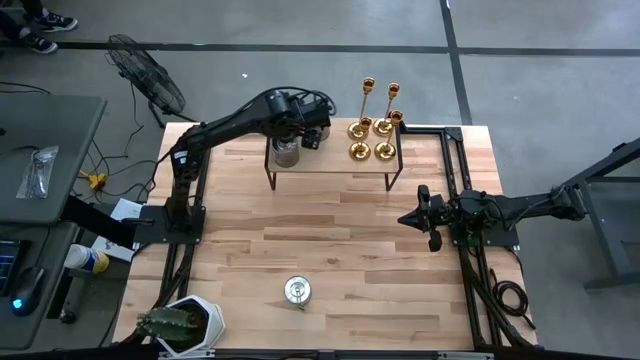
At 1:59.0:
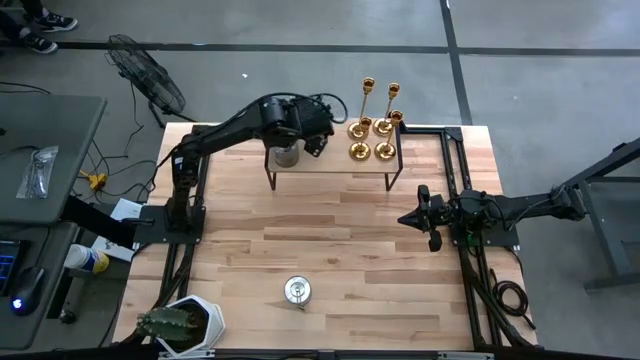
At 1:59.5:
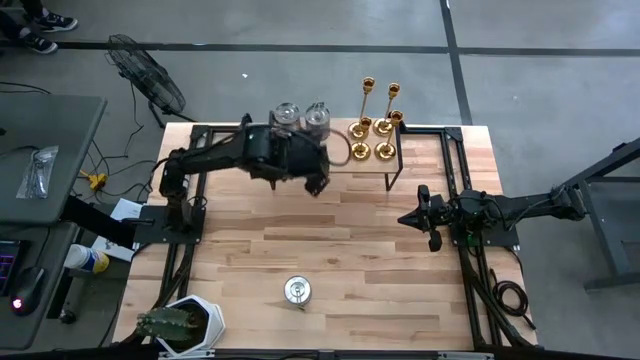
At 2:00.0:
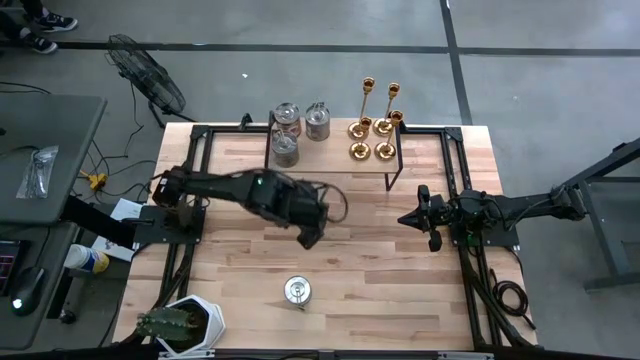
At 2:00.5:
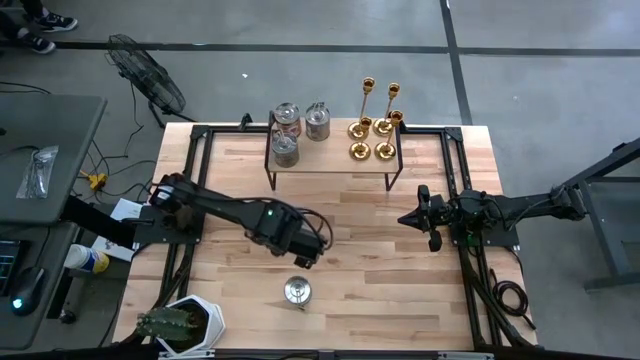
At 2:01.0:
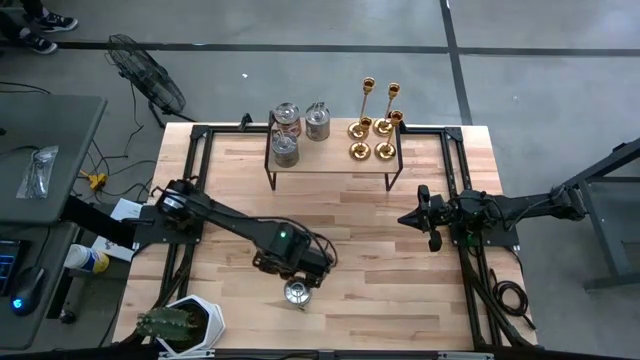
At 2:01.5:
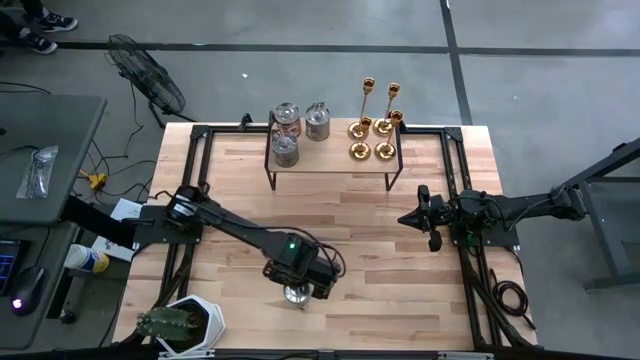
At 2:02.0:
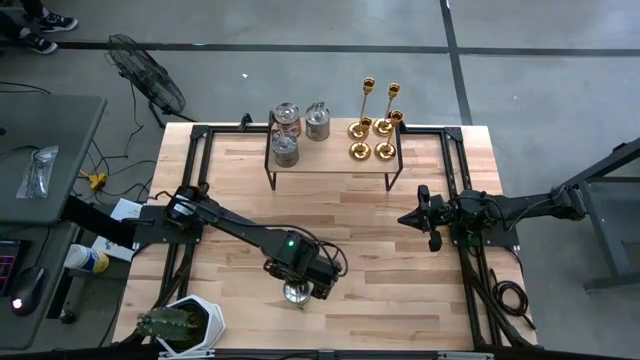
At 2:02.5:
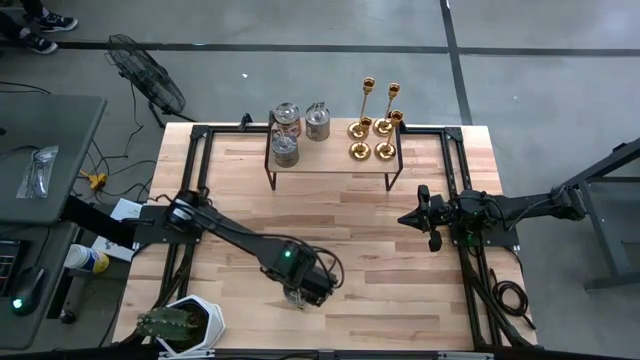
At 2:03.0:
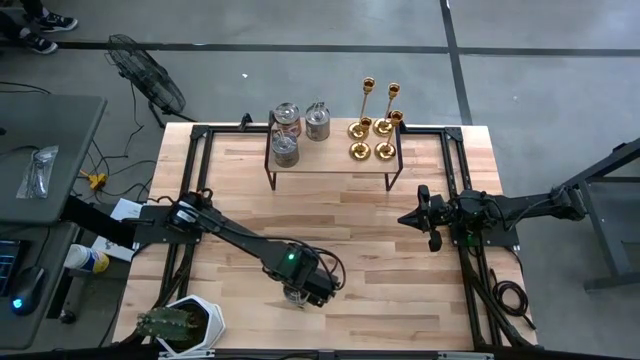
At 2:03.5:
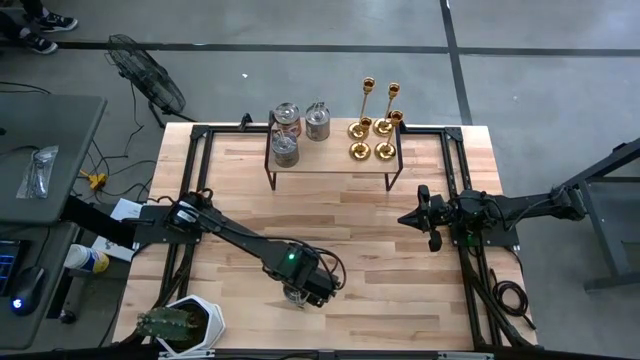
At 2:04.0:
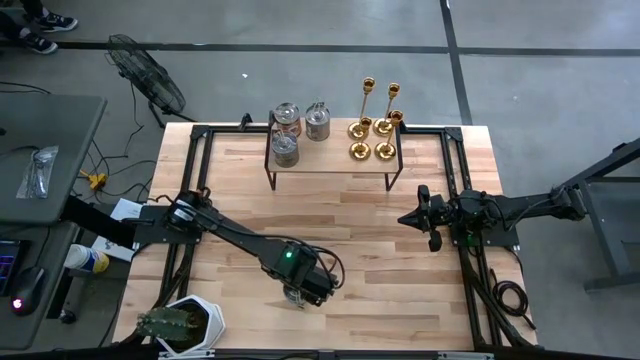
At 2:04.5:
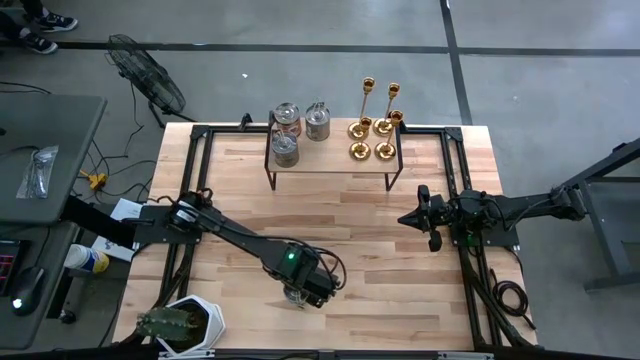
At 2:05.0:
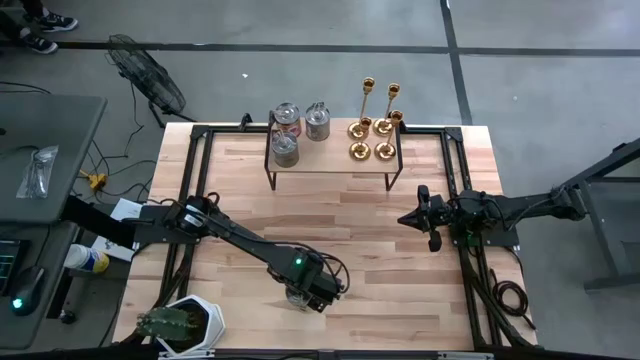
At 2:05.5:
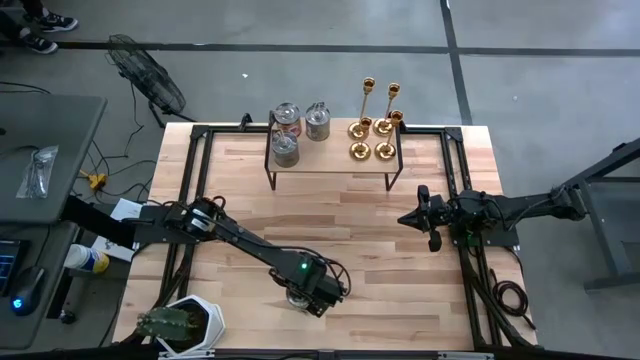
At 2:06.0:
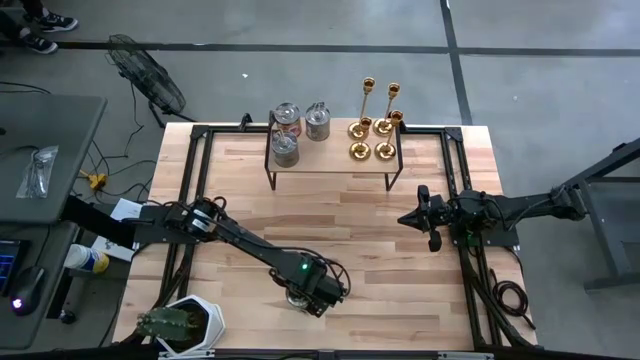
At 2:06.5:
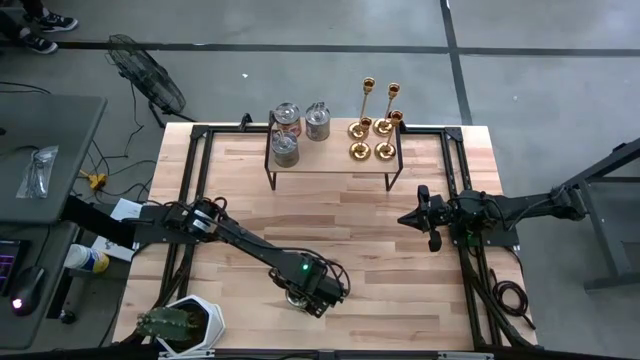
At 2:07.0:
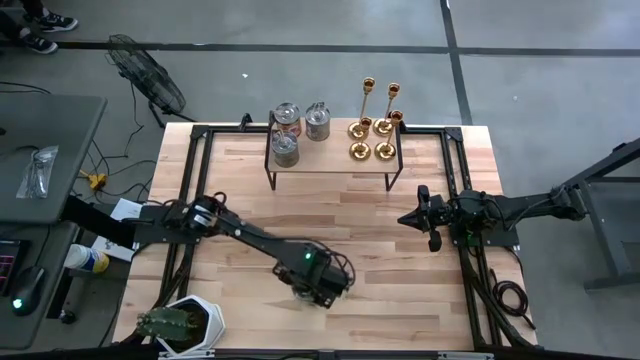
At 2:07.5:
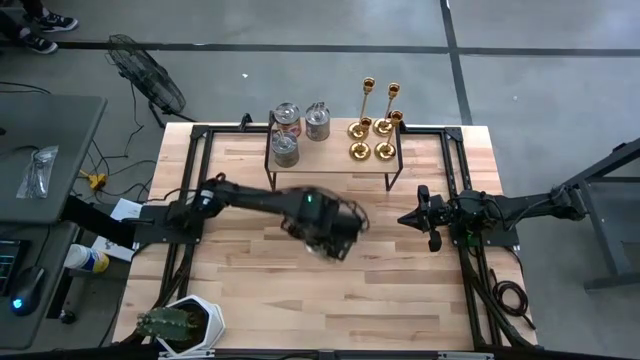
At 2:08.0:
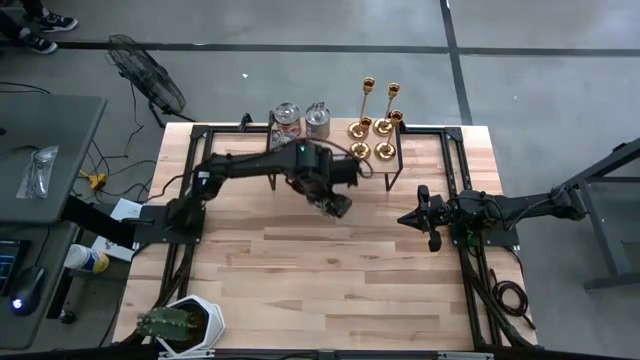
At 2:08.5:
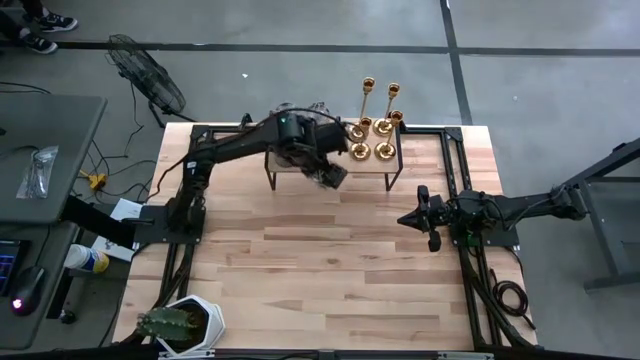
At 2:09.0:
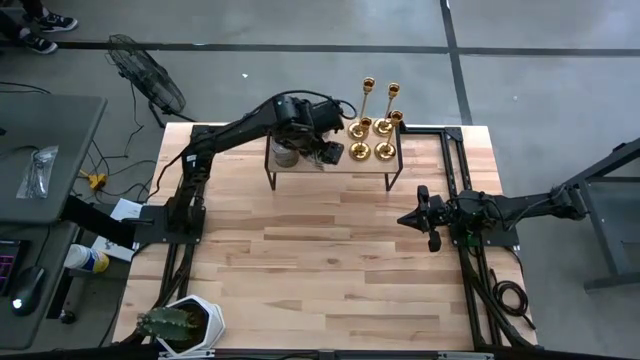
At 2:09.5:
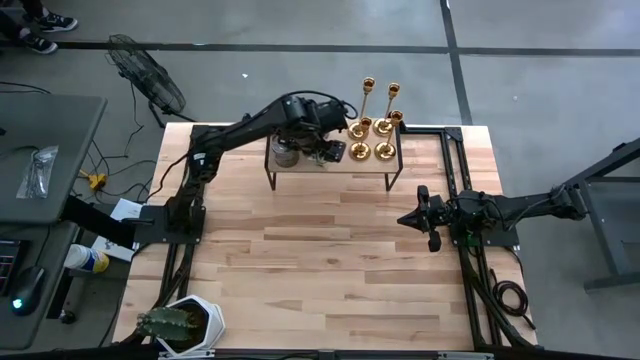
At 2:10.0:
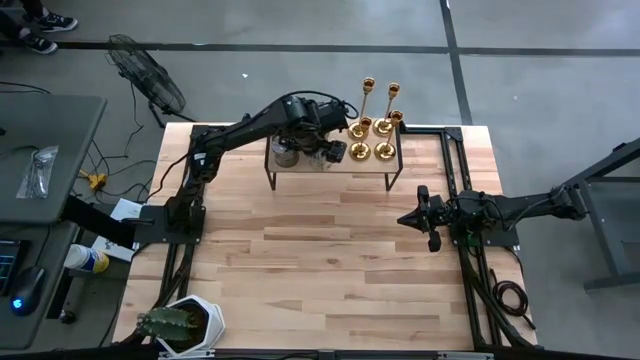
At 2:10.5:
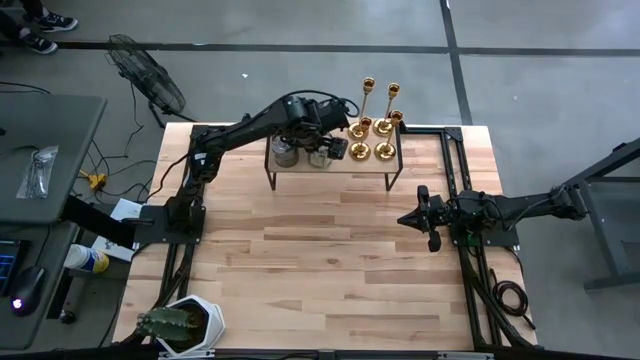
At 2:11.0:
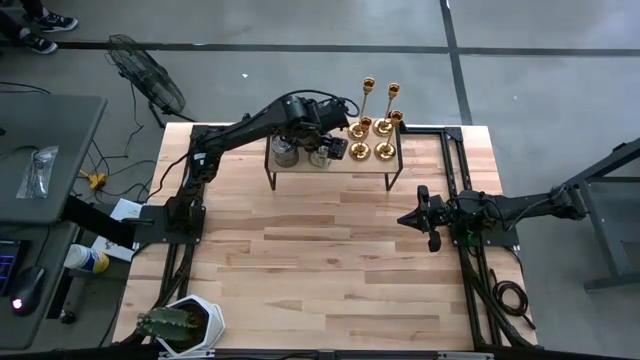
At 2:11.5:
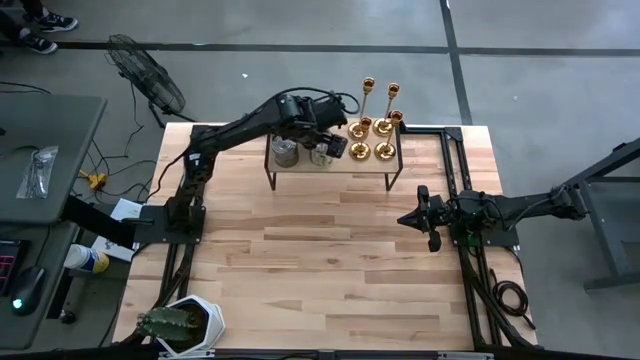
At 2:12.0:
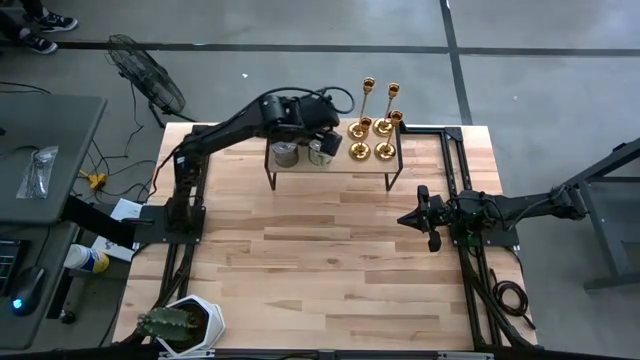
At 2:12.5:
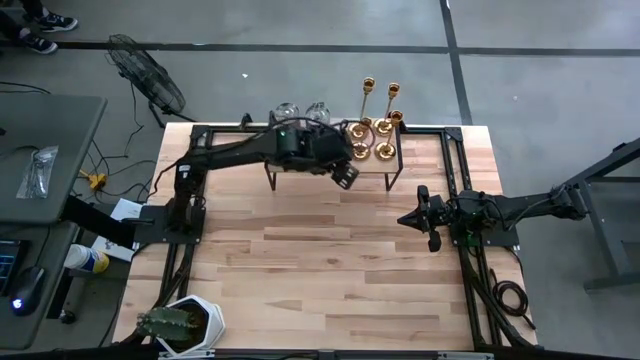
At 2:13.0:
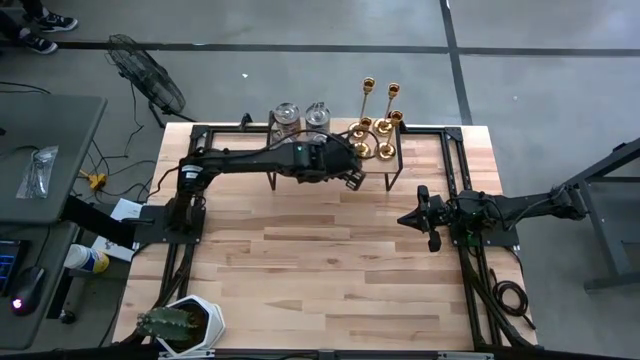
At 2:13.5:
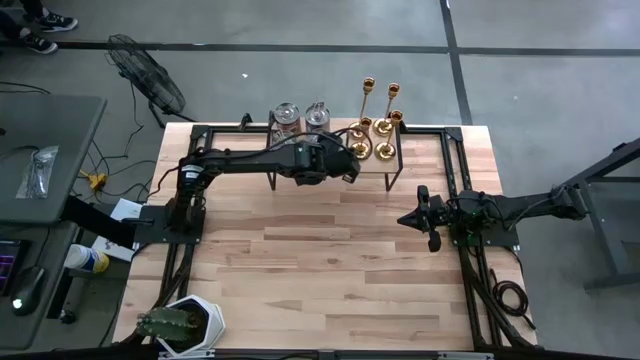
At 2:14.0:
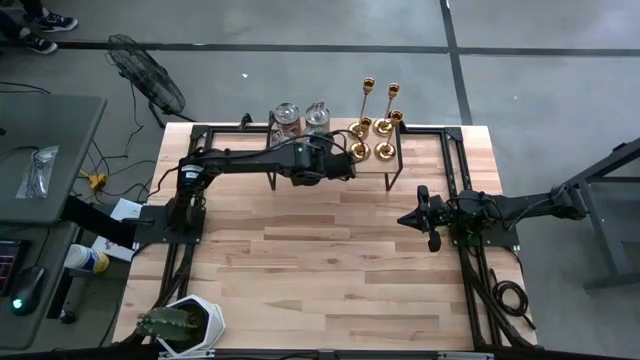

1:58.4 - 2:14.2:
Task: Pick & Place candle stick holders
Put the green scented candle on the shelf aligned with the other scented candle

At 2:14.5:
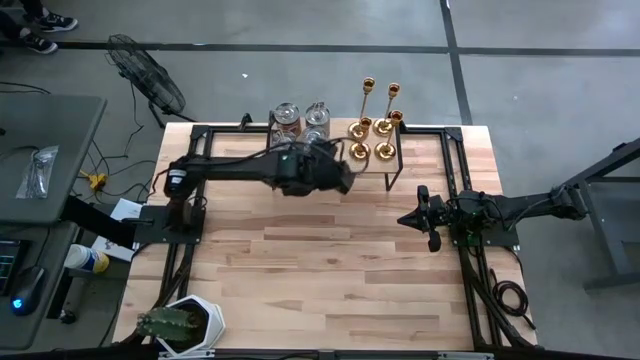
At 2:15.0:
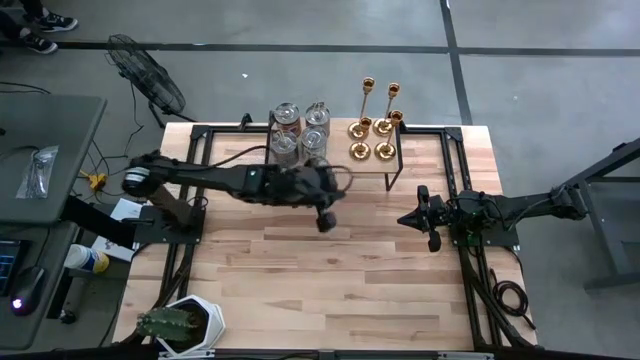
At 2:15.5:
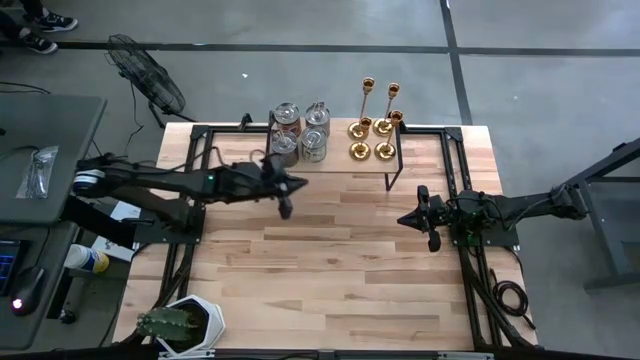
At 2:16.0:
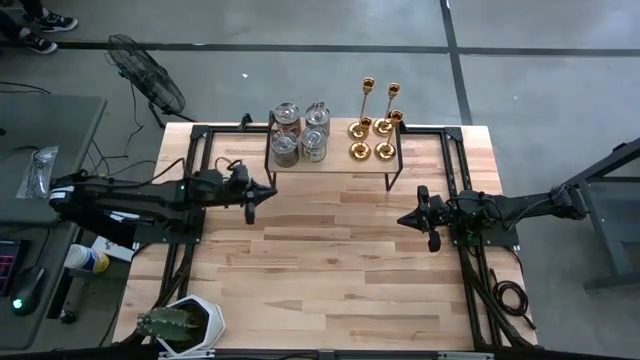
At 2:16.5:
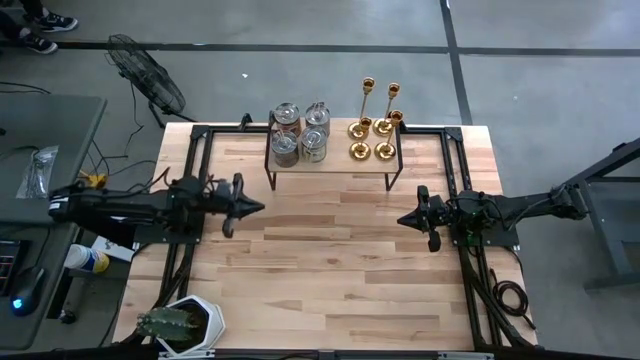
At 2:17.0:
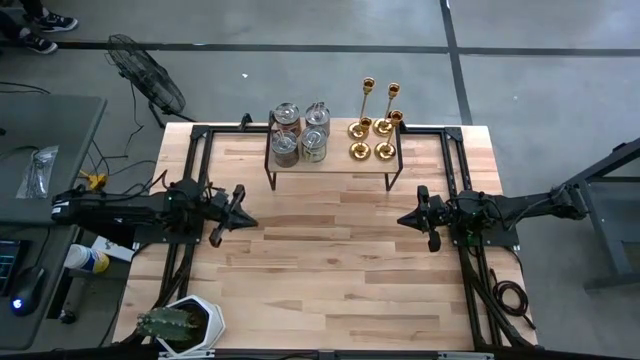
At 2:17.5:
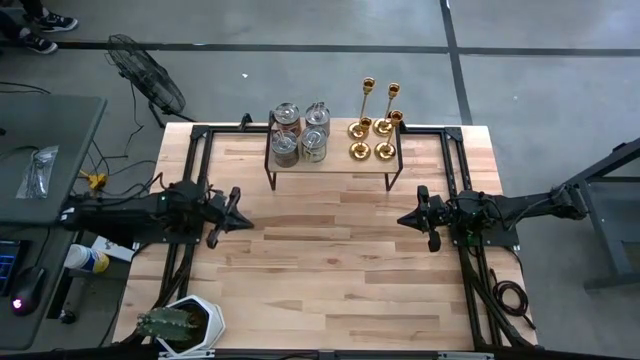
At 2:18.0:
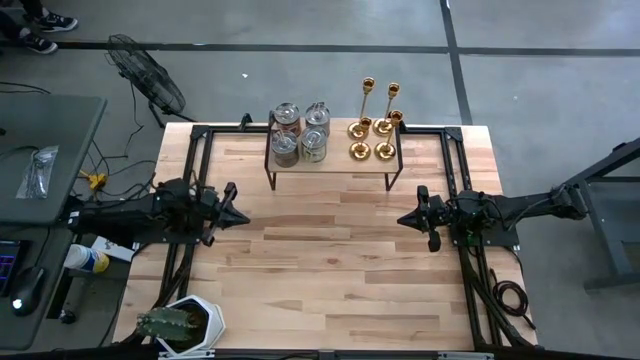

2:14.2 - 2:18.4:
Return to Home Position
